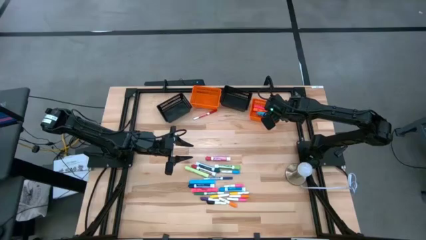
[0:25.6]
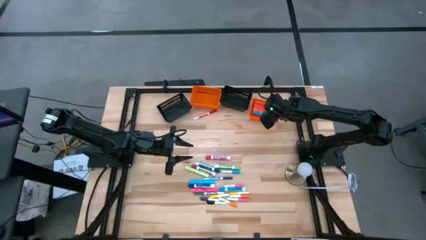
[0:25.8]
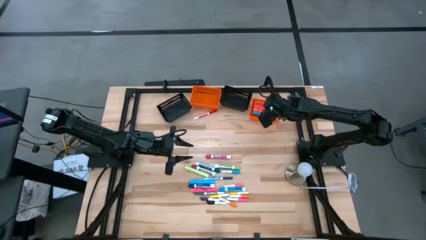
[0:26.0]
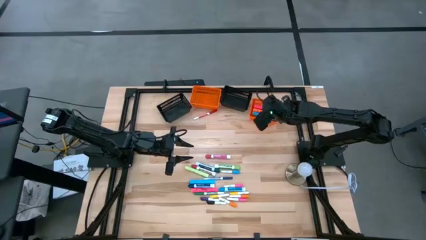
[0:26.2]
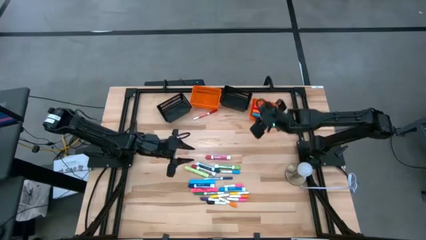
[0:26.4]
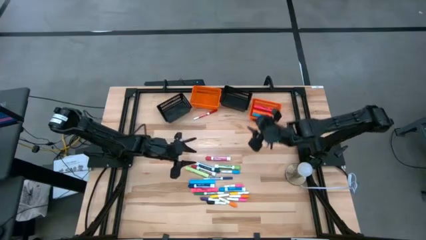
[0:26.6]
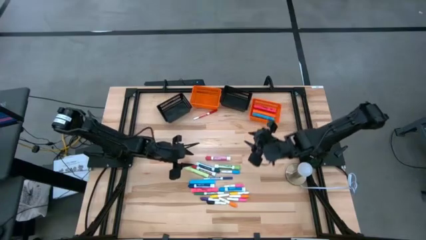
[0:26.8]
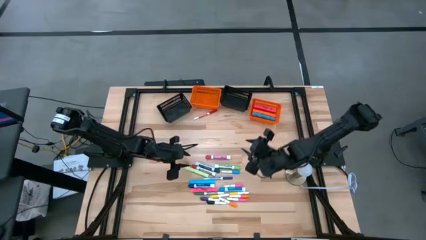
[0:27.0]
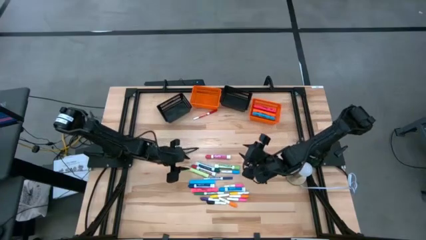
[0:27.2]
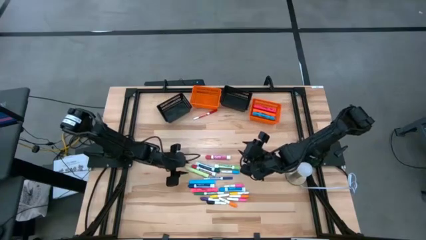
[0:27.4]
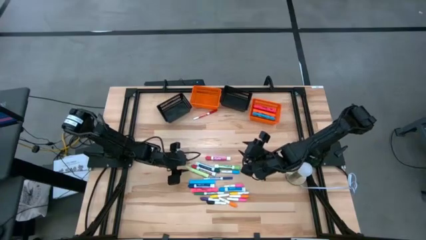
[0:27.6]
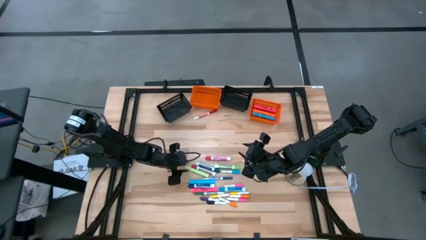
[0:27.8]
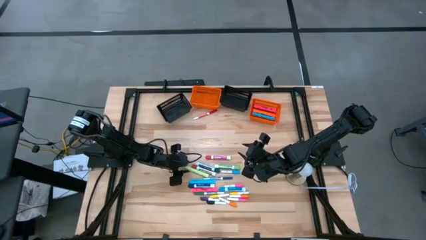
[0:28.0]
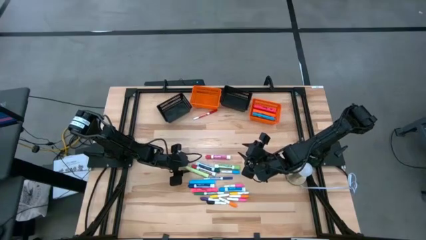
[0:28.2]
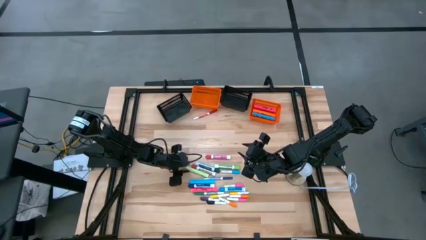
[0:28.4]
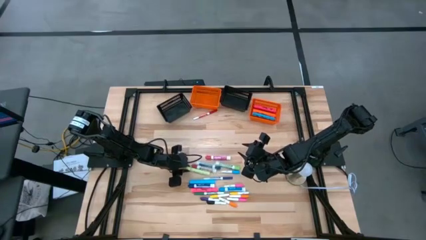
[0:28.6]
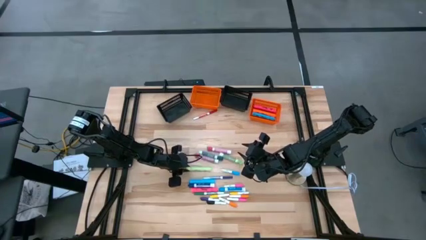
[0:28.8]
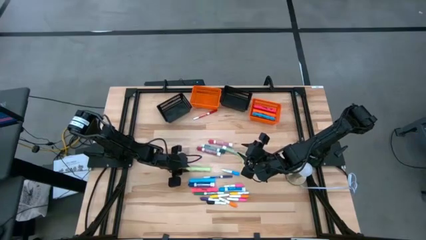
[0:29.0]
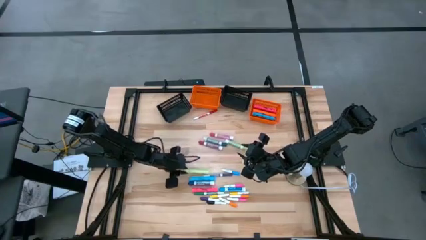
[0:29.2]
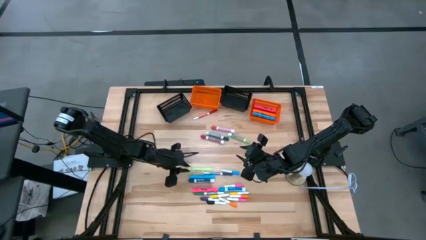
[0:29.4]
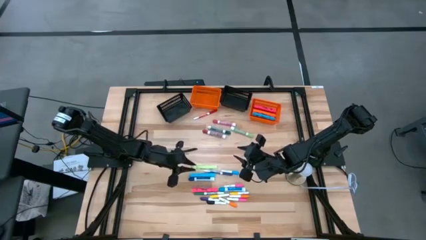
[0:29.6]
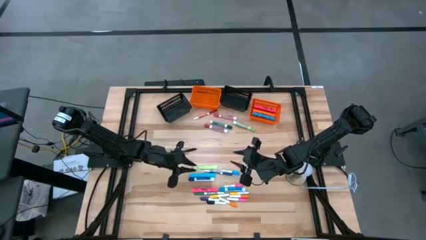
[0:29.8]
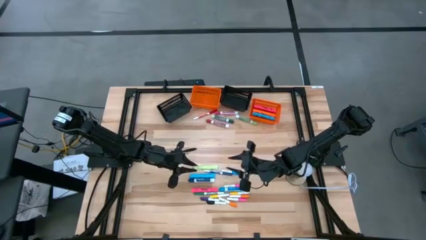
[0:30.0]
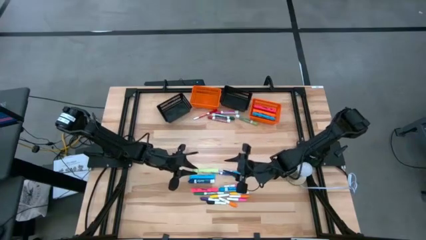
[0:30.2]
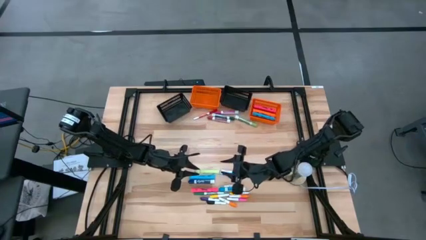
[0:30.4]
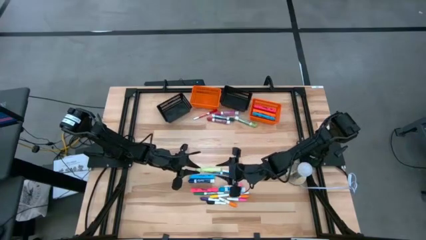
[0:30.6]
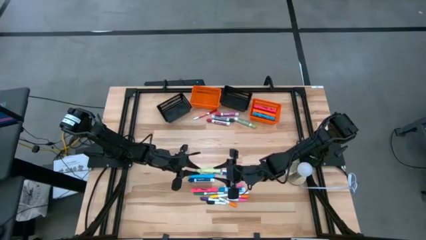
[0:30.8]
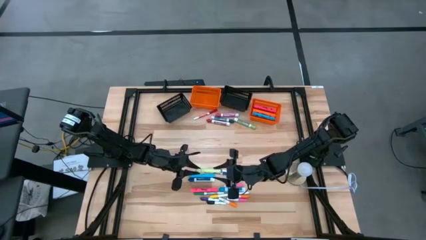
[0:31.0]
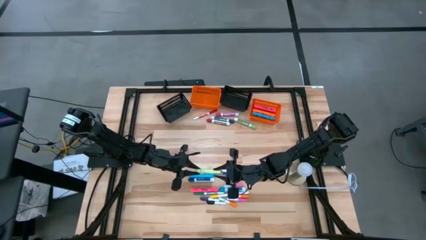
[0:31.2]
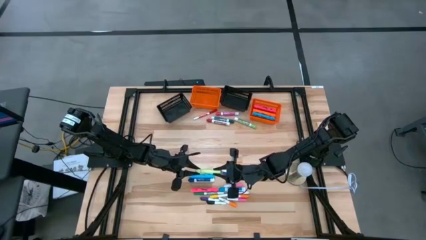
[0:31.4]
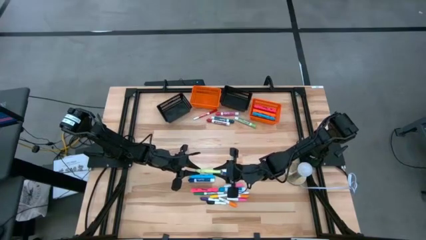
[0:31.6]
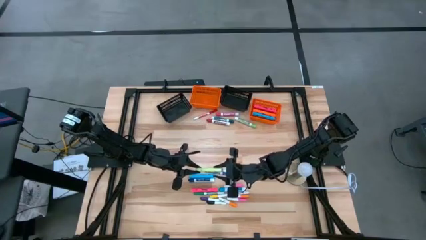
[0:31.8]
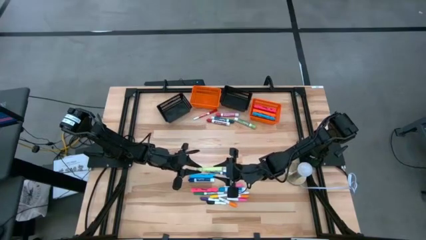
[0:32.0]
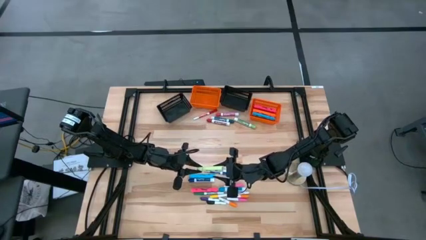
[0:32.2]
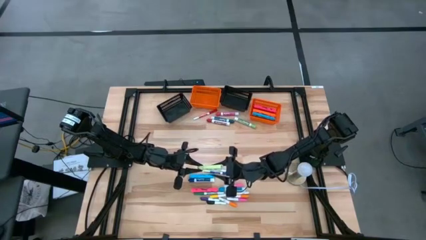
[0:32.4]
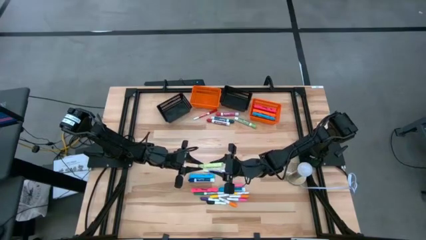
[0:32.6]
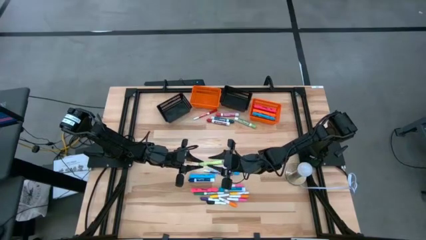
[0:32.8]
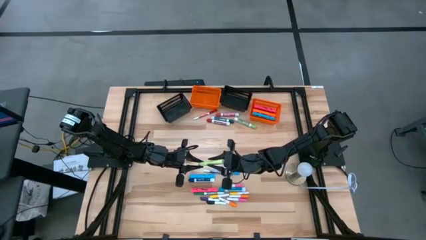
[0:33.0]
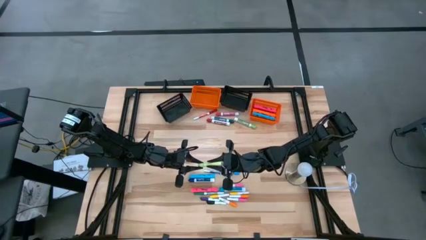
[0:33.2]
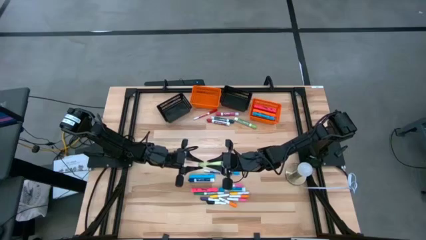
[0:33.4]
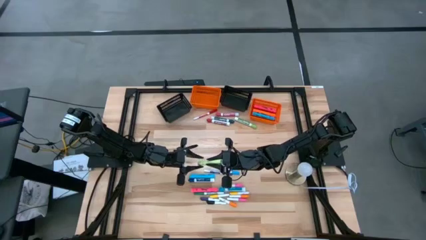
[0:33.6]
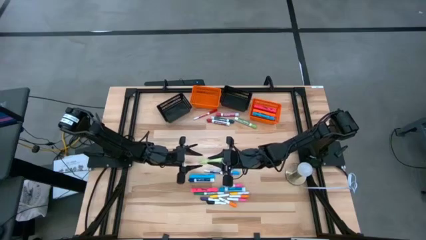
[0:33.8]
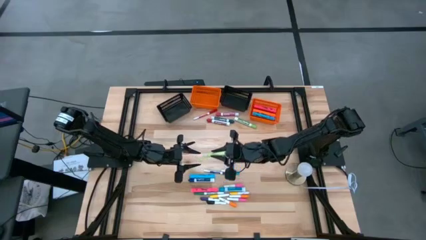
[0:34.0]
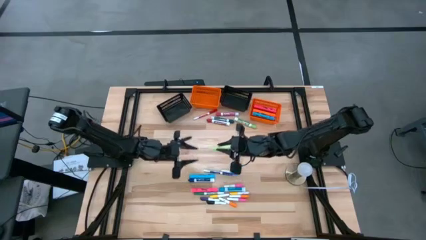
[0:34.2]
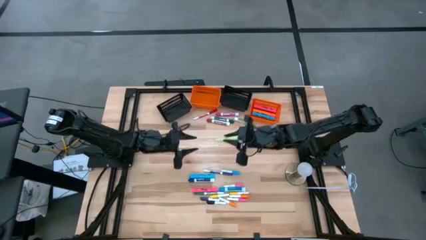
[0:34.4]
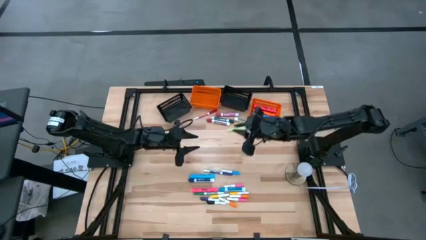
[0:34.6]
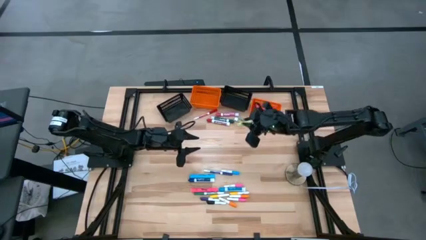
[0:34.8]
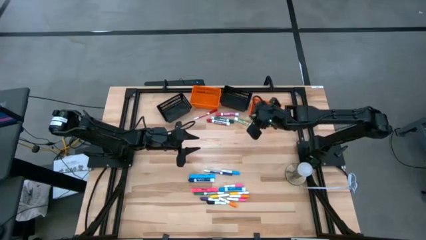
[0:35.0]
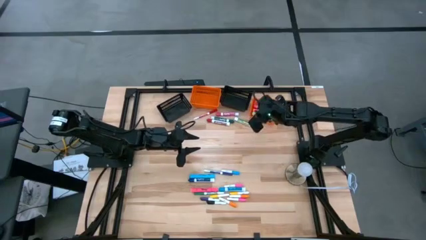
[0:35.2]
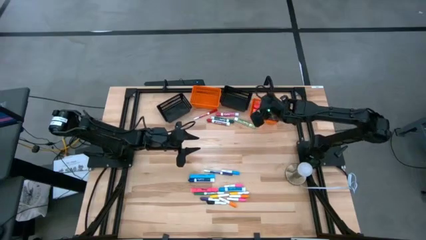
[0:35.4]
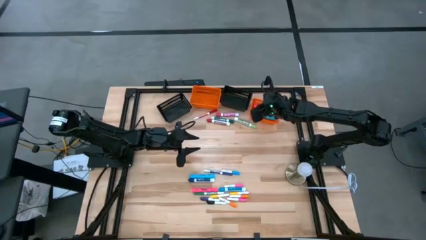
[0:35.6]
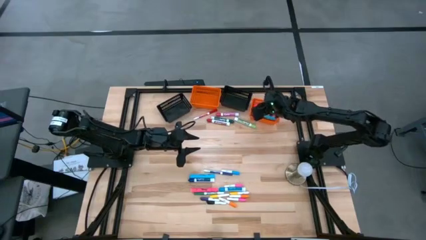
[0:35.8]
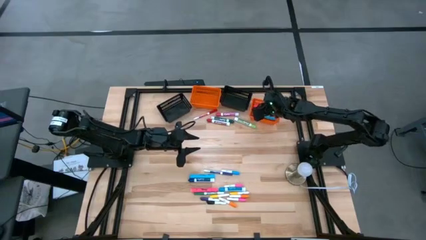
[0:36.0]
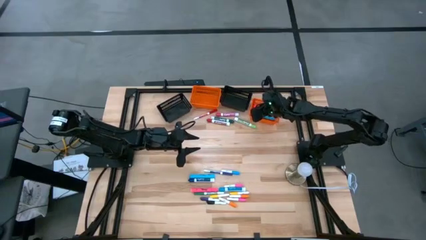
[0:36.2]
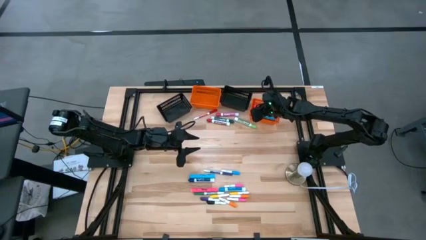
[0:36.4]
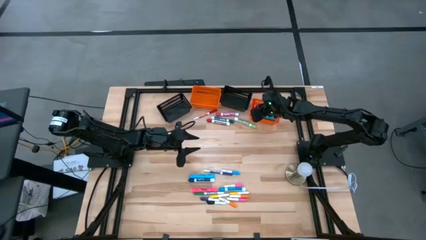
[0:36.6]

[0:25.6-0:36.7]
Task: Pick & Place Markers
Put the large light green highlighter into the right orange bin

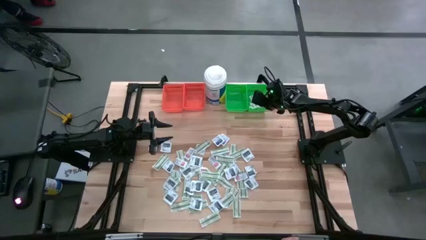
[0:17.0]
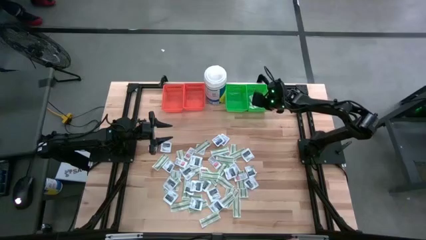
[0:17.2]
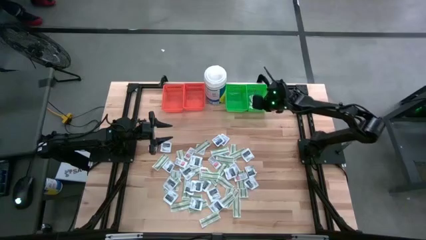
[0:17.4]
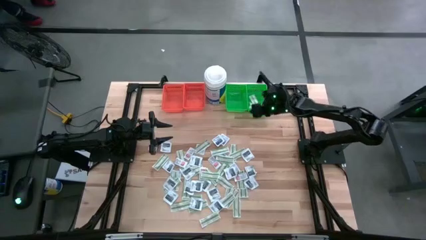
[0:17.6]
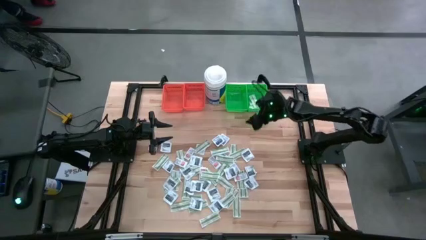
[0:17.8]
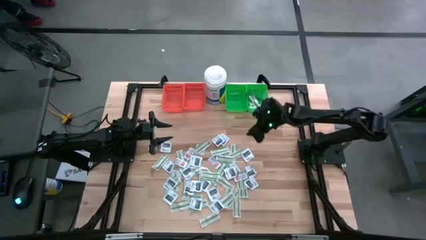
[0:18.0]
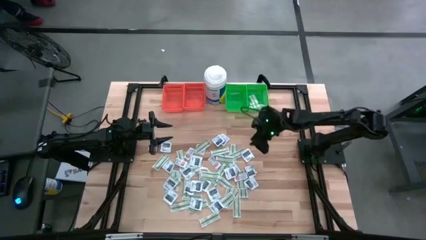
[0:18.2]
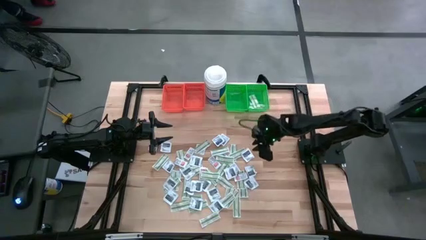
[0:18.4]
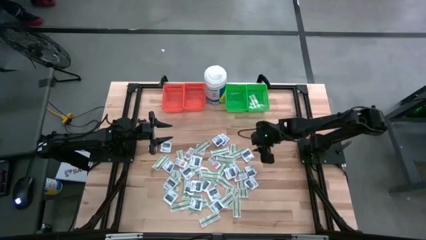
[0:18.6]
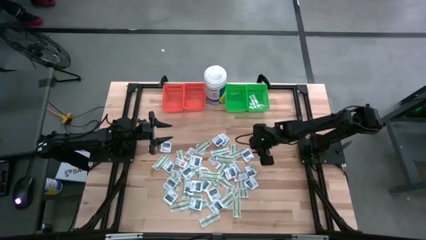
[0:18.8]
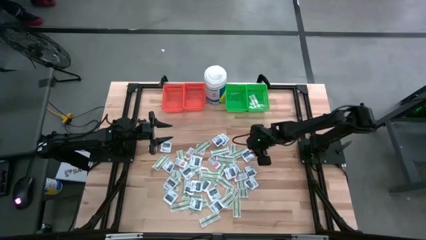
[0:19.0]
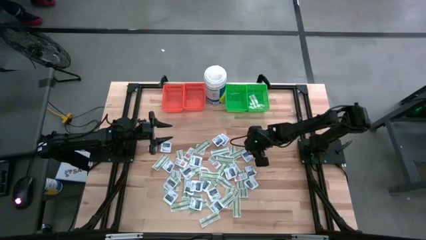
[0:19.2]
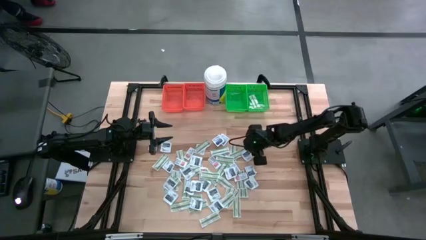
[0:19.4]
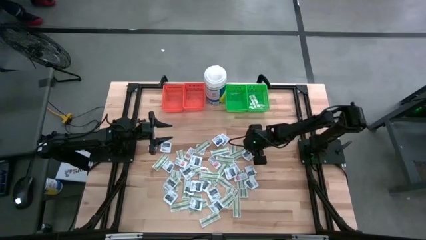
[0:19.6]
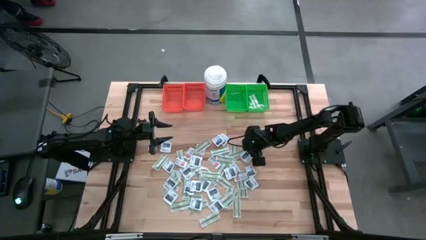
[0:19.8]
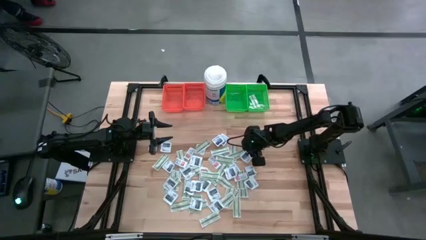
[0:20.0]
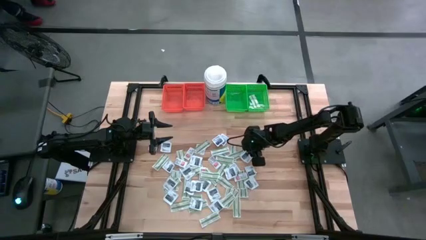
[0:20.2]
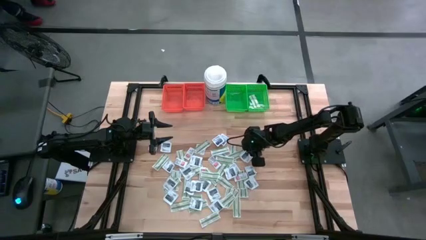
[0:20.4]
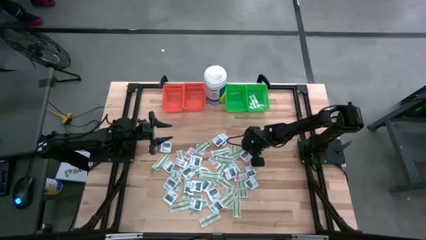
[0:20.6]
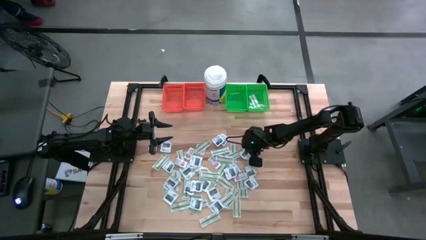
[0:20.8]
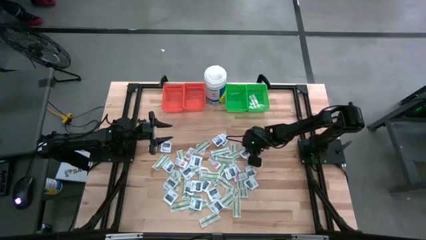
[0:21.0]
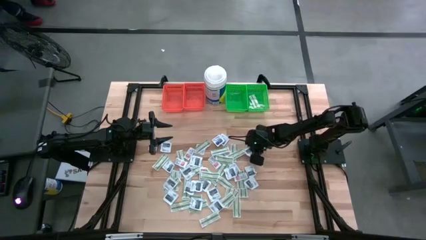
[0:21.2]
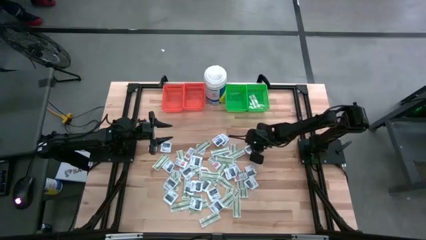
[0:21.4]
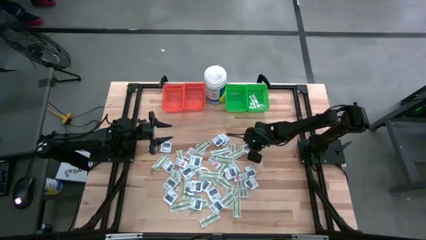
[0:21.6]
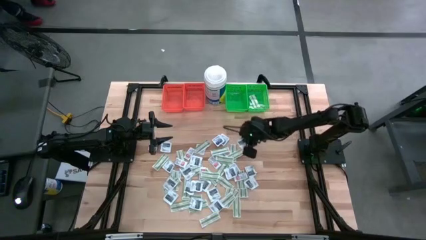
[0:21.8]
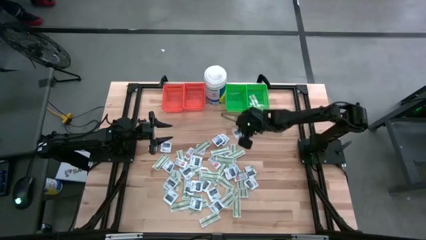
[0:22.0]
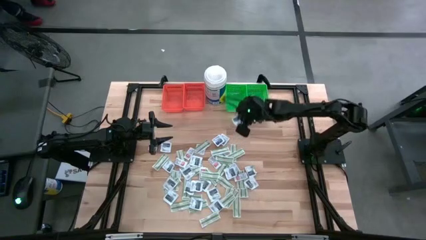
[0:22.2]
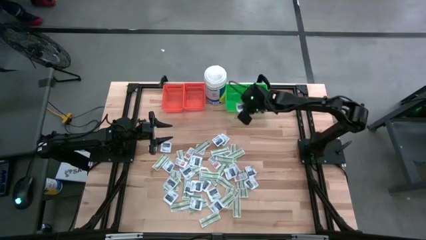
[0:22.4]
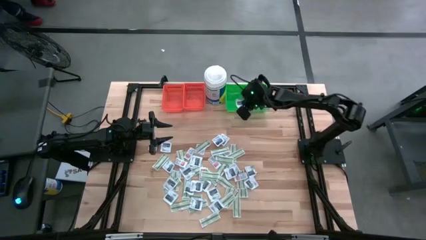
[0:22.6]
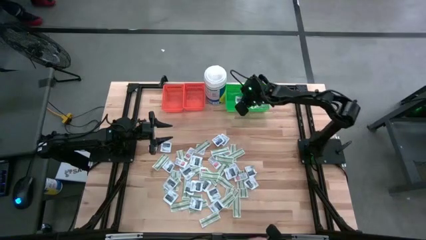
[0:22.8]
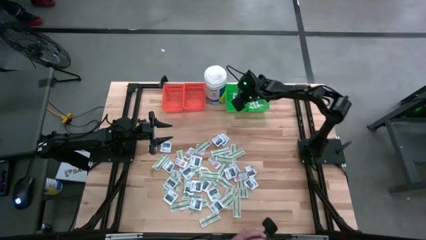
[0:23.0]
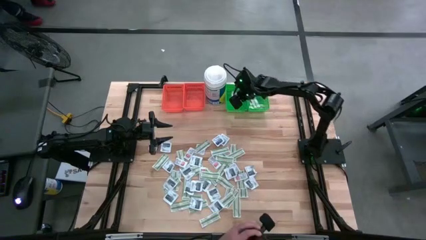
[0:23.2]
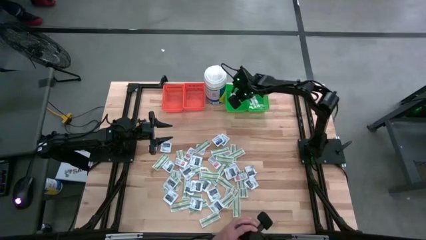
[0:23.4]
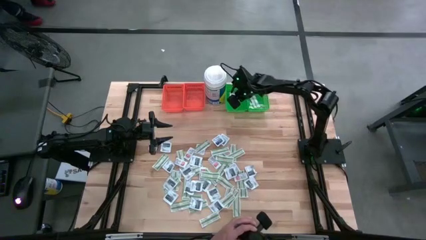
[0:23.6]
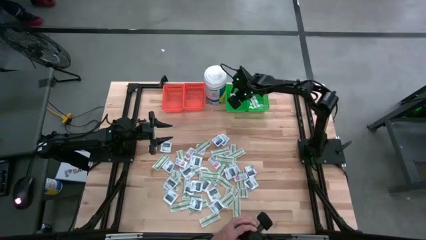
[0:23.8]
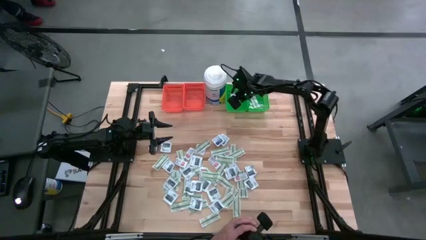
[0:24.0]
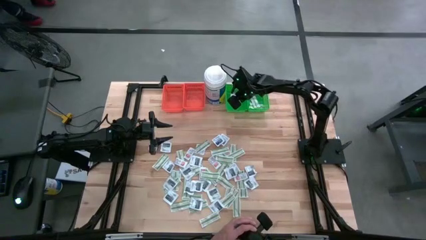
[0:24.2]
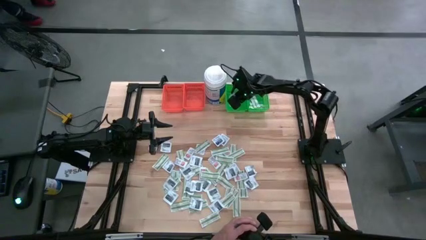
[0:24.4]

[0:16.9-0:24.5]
Task: Pick & Place First Aid Supplies
Put the black towelette pack into the left green bin
